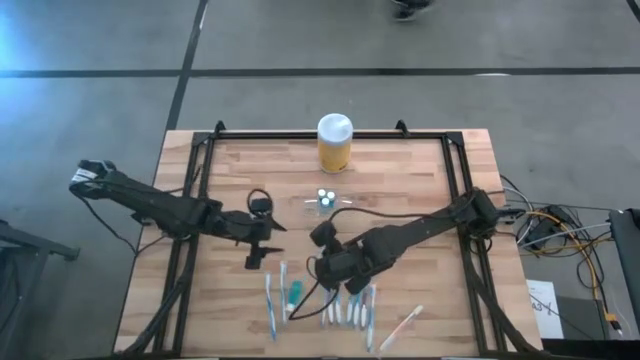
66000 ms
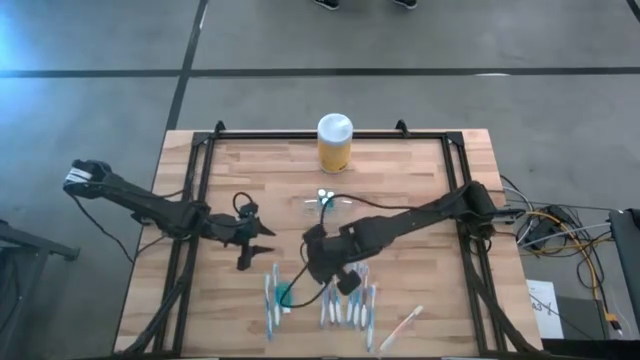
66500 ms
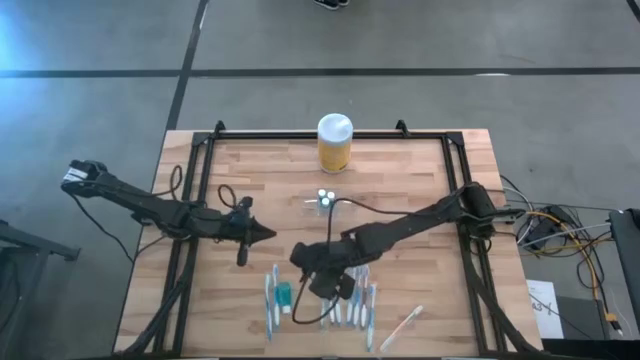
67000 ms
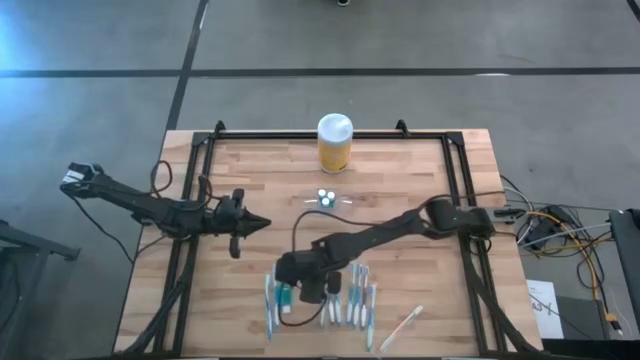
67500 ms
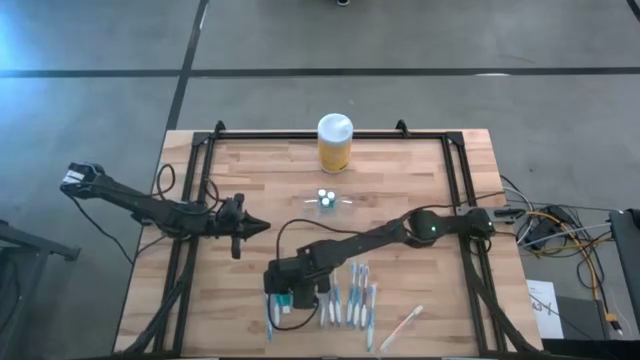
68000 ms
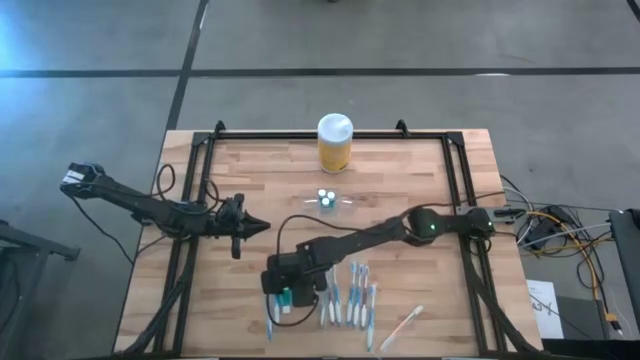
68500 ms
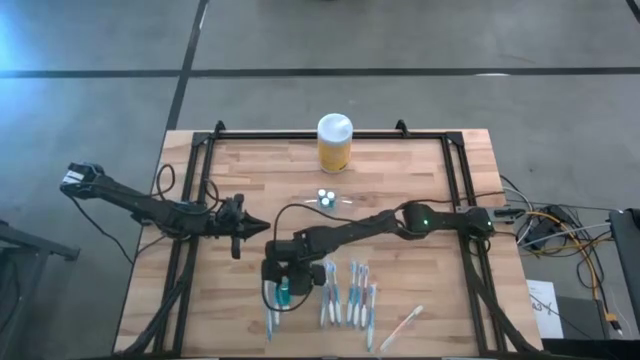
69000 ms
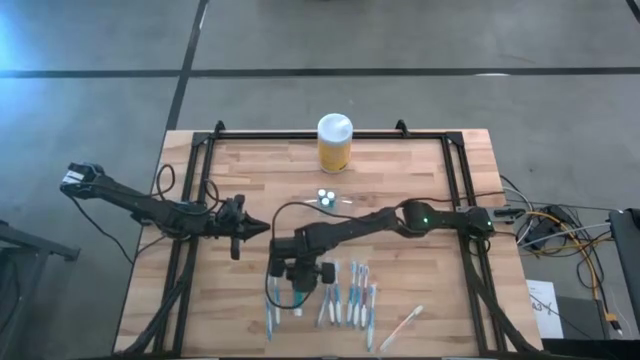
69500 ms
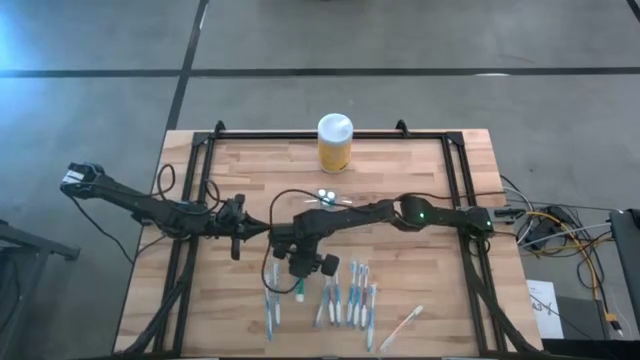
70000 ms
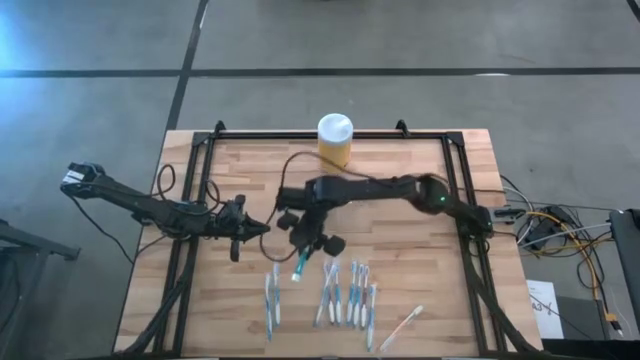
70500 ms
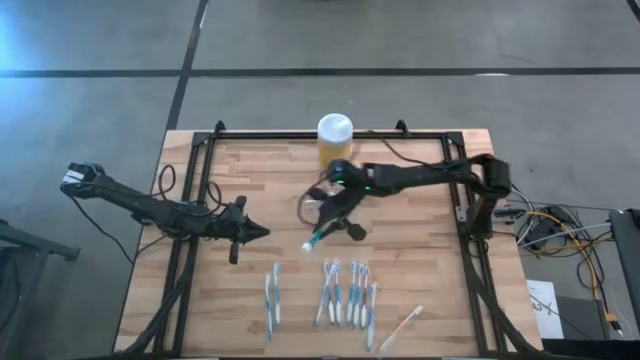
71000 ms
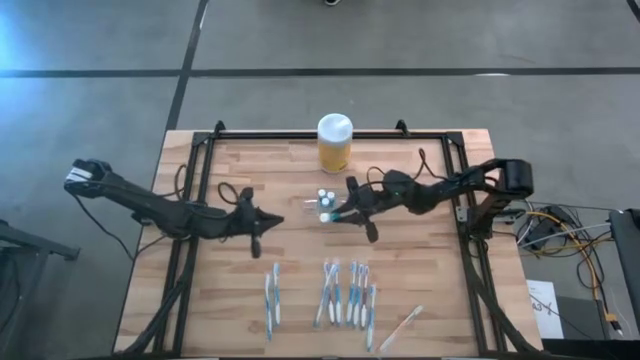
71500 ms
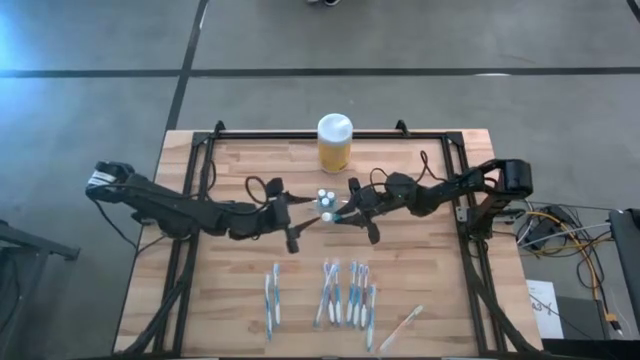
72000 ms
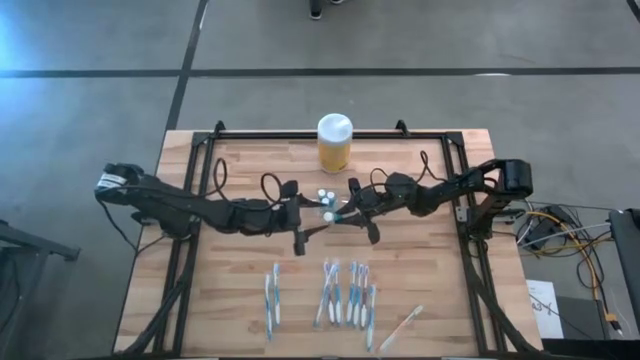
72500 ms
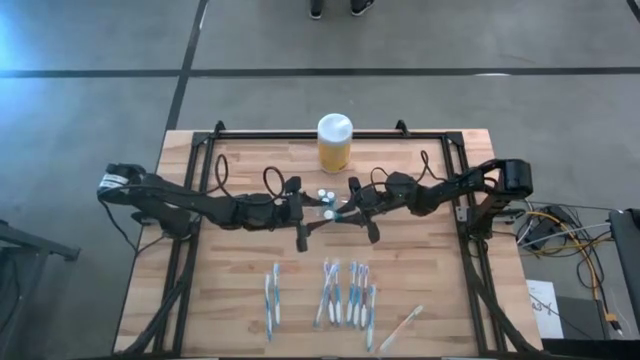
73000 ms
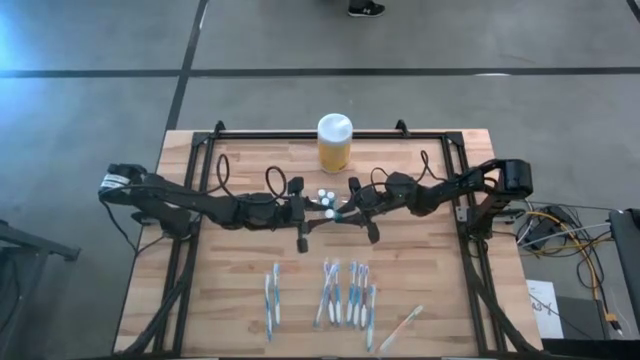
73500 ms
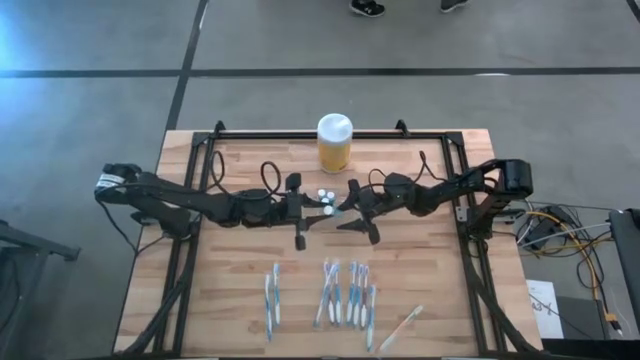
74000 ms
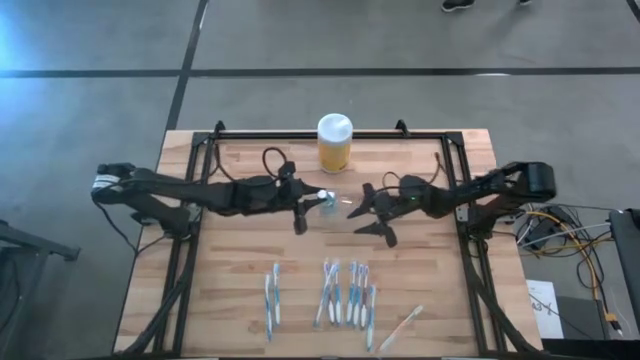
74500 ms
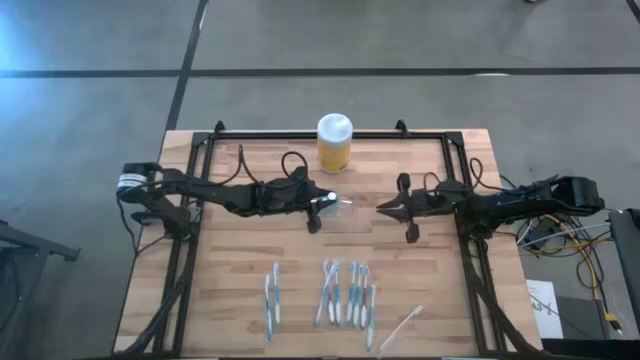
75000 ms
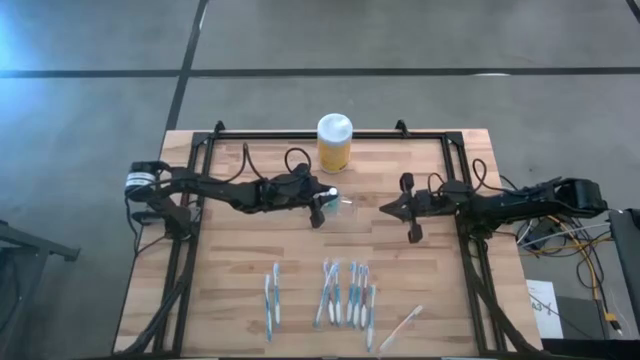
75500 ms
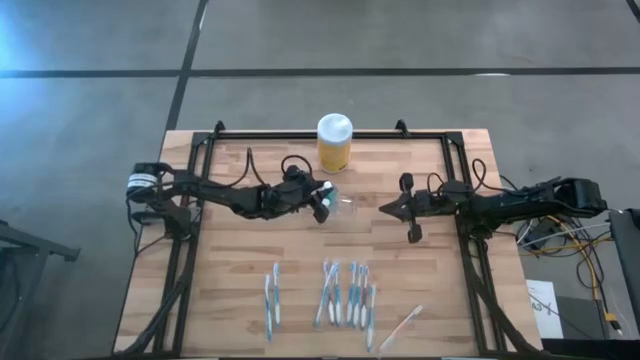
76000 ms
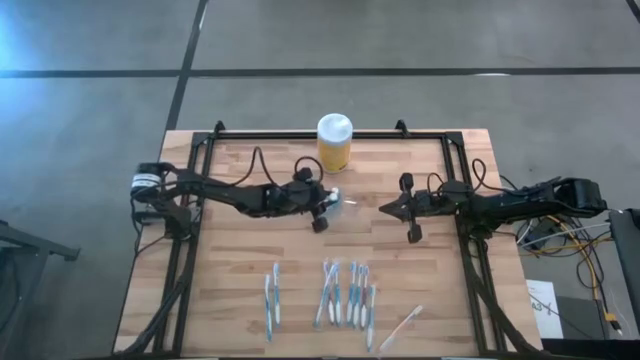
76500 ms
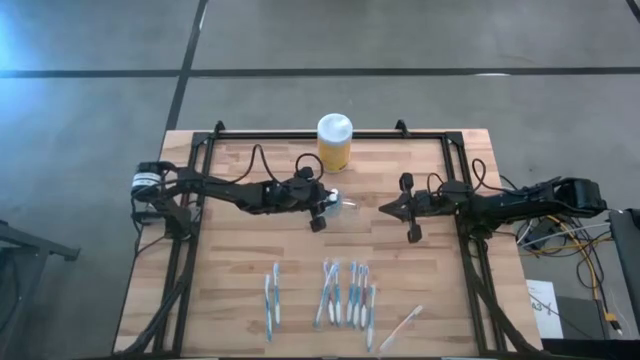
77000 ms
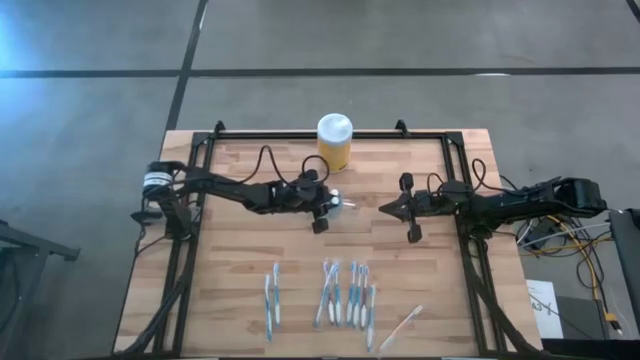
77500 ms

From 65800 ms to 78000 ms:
Task: Pick & Place toothbrushing station
Put the blue mouthwash into the middle of the transparent organizer

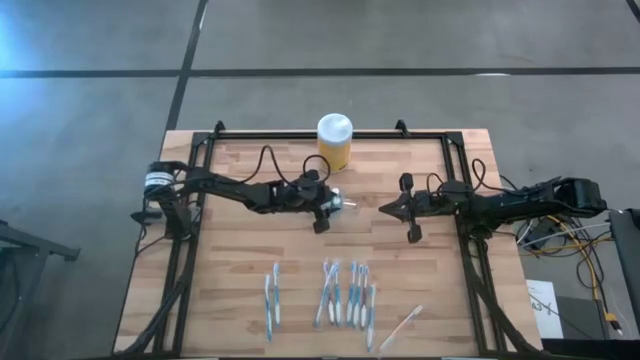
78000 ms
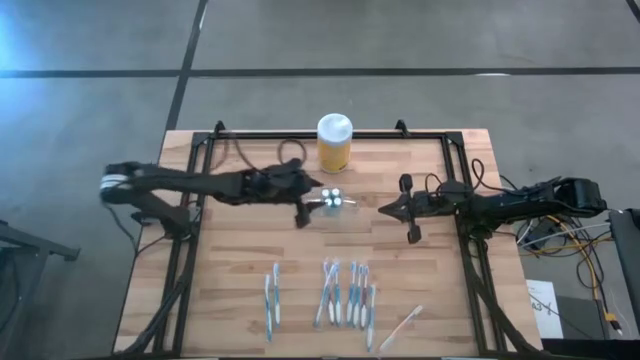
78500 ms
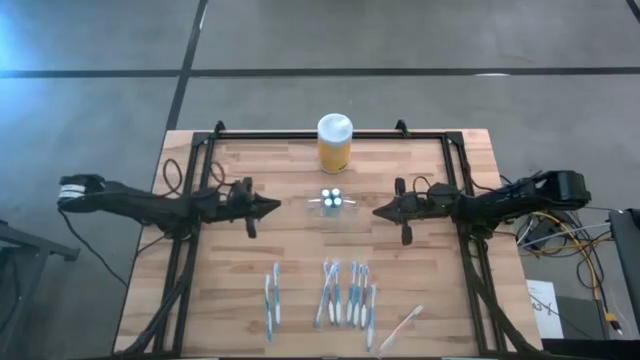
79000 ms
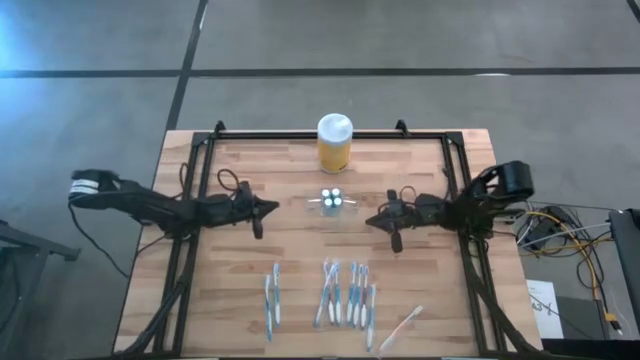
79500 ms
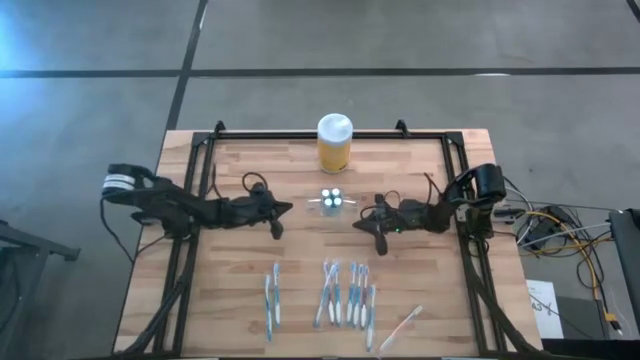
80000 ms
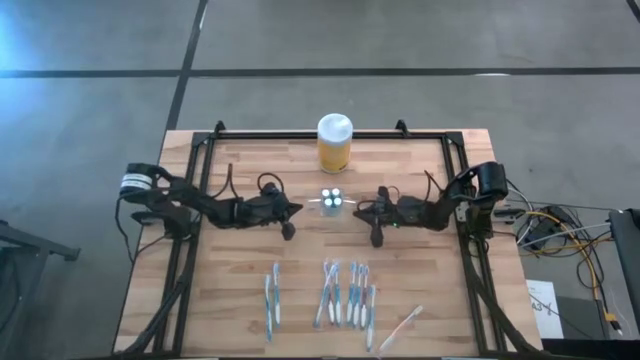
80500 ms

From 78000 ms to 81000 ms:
Adjust the transparent organizer

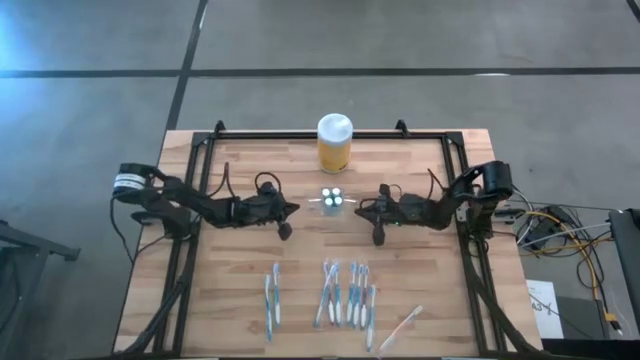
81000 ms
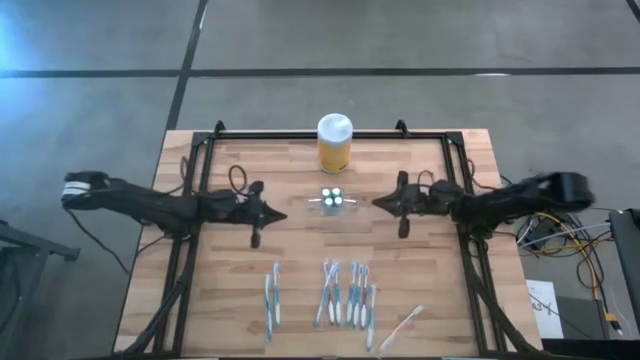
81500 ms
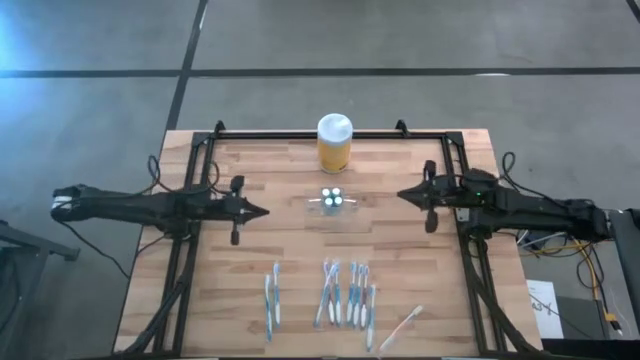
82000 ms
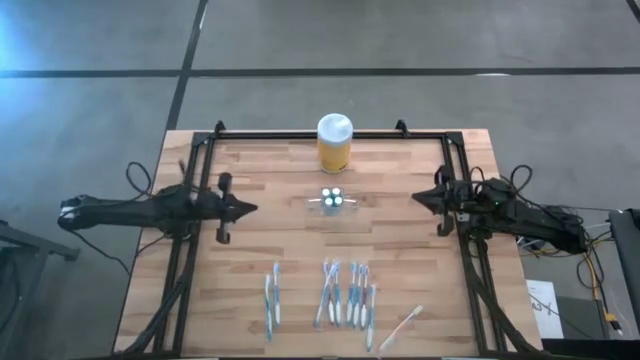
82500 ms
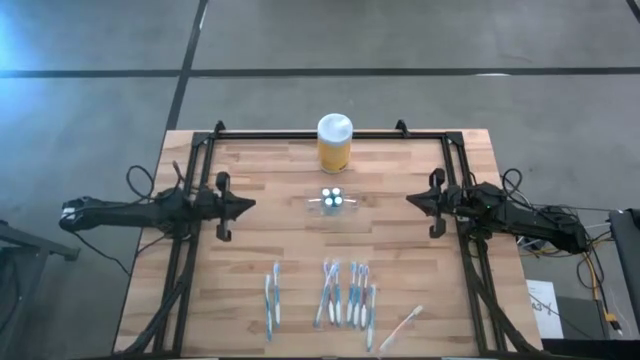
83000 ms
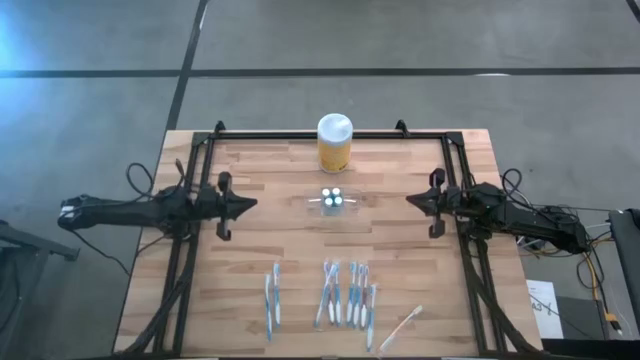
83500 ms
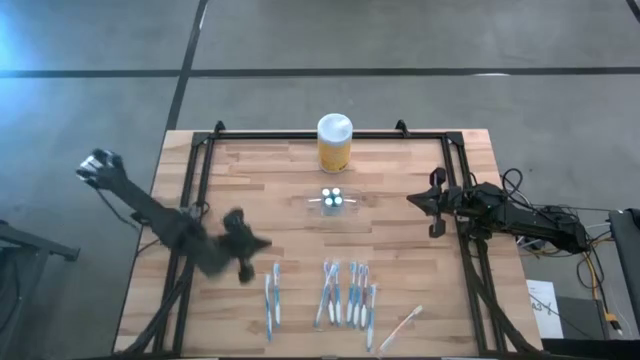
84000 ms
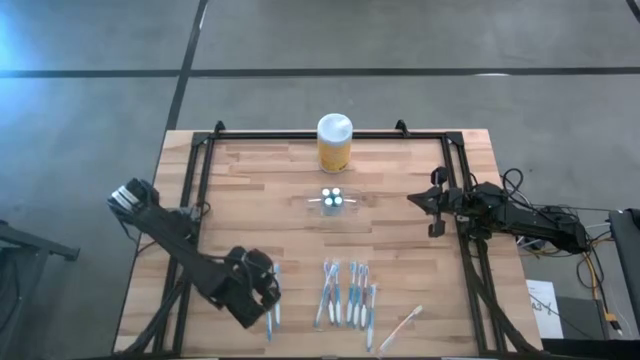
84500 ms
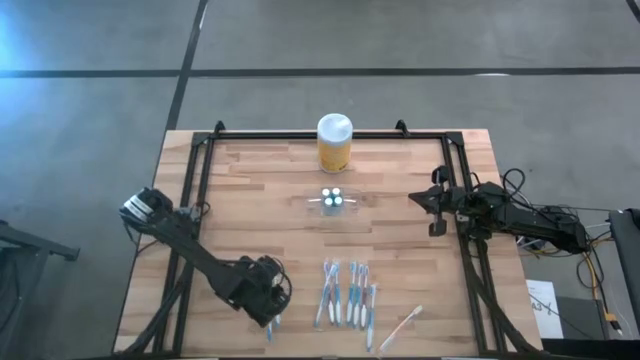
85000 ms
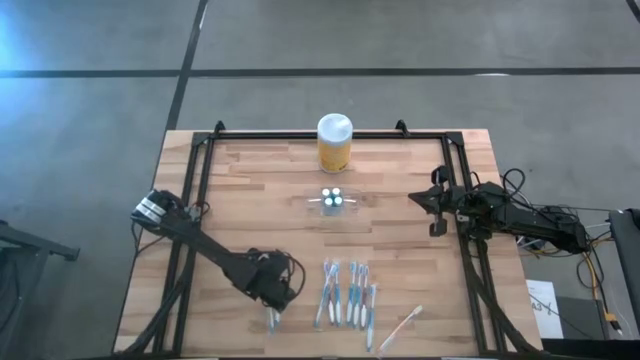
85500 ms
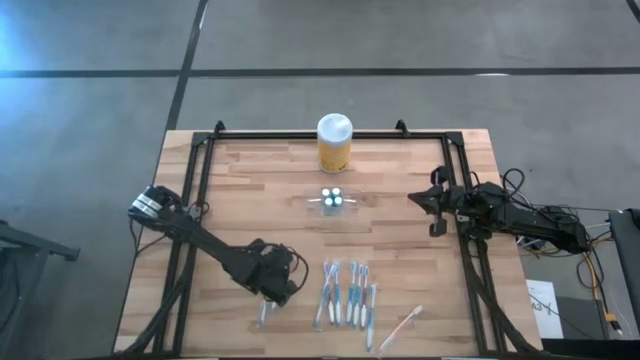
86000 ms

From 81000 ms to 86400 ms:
Put the blue toothbrush into the left of the transparent organizer

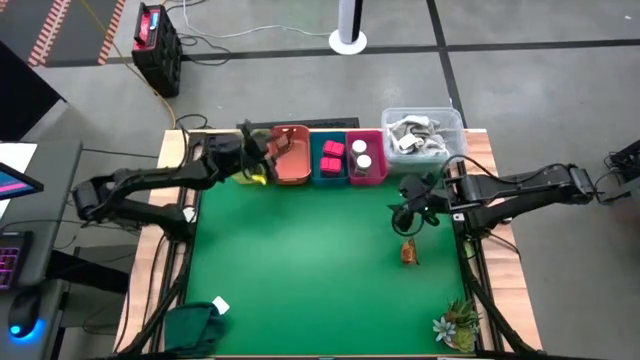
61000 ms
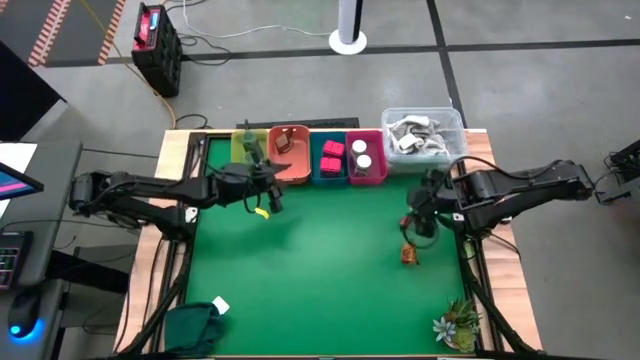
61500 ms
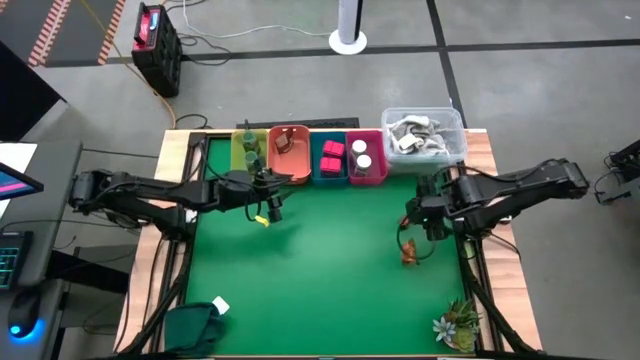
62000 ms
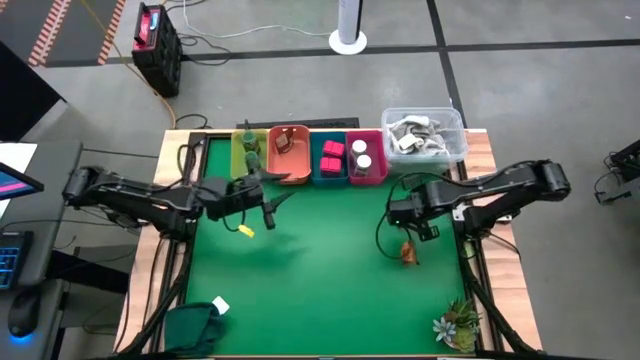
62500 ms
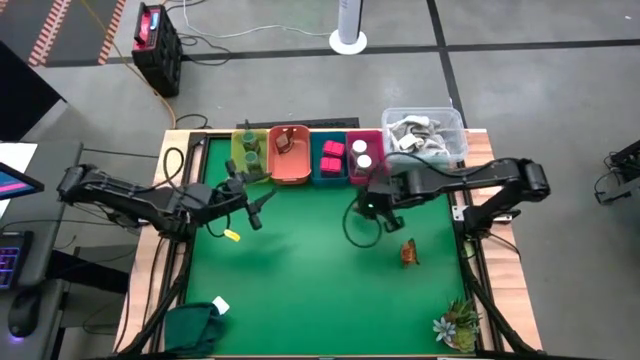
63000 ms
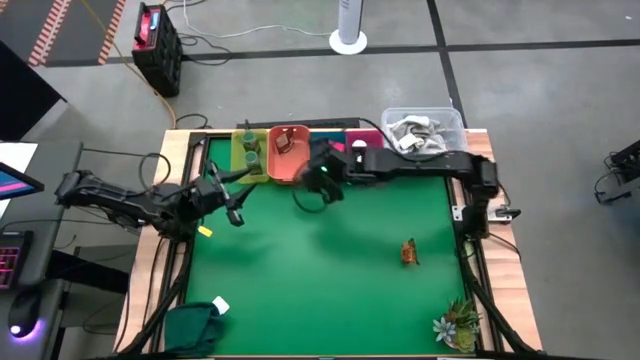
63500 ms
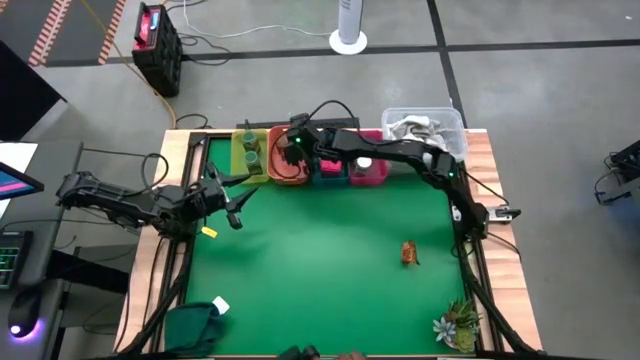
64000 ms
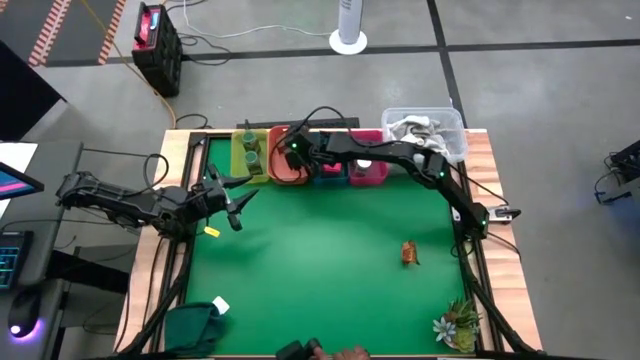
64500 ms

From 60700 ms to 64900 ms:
Task: Sort spices by type
Put the top orange seasoning bag into the orange bin
